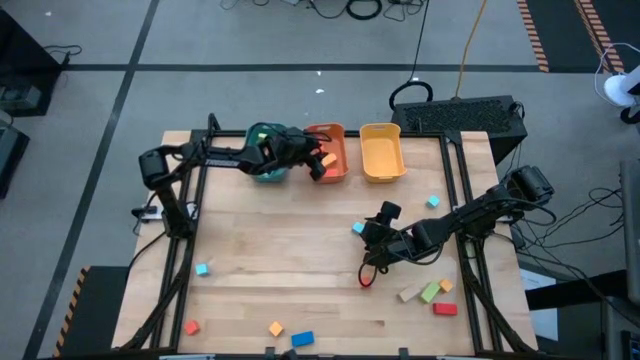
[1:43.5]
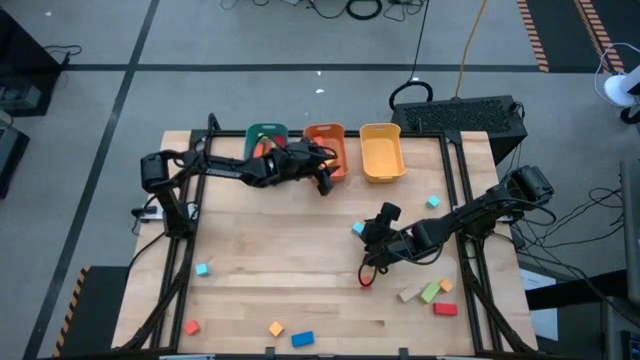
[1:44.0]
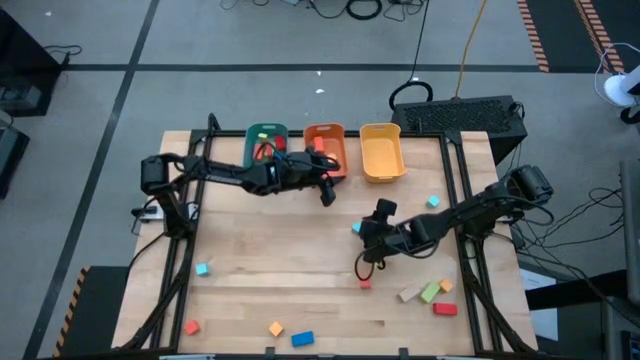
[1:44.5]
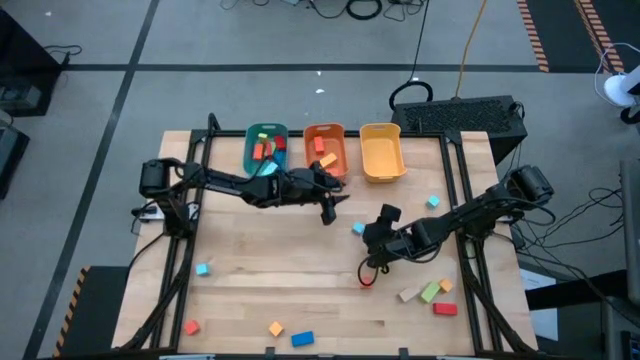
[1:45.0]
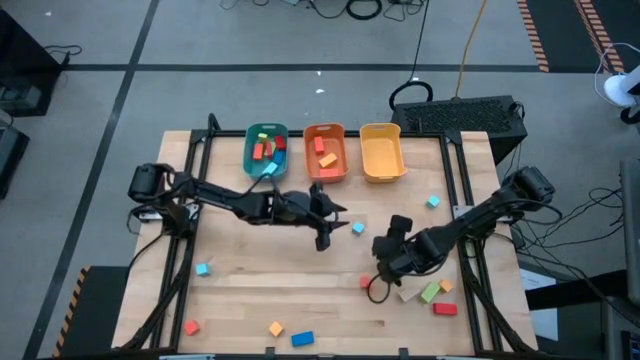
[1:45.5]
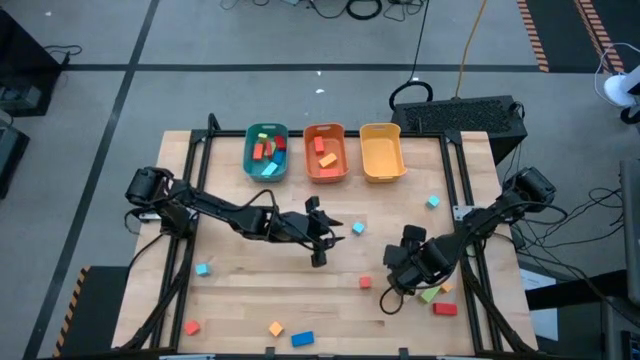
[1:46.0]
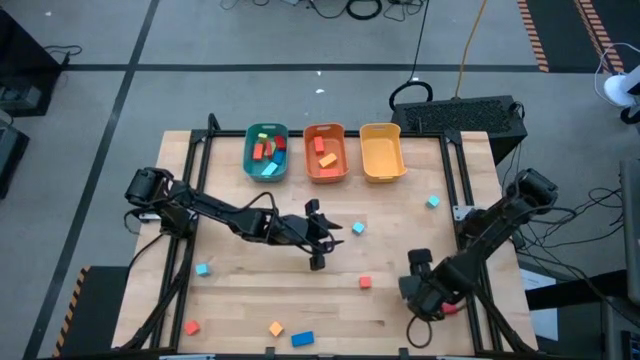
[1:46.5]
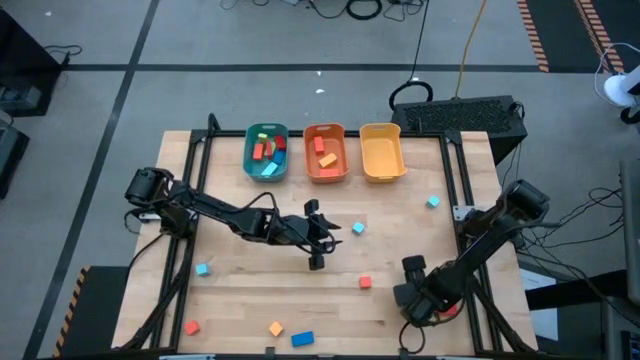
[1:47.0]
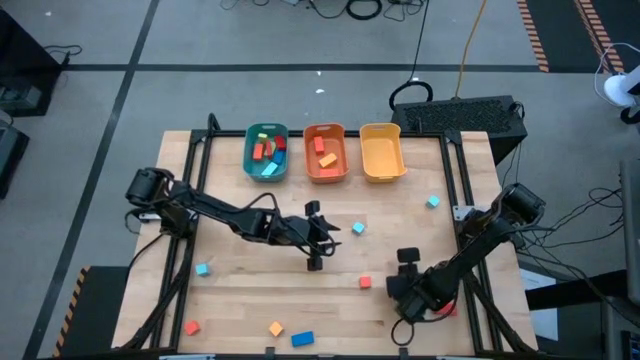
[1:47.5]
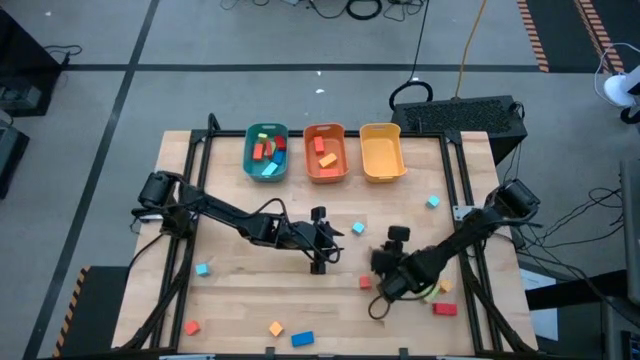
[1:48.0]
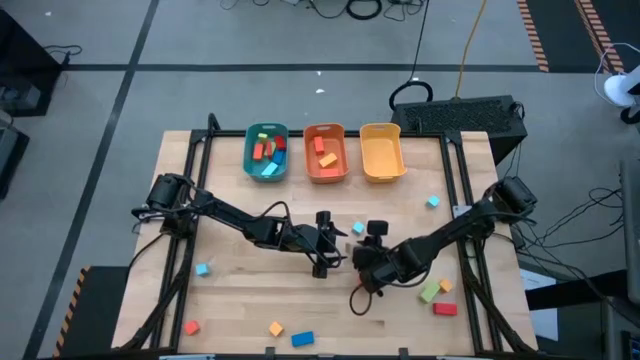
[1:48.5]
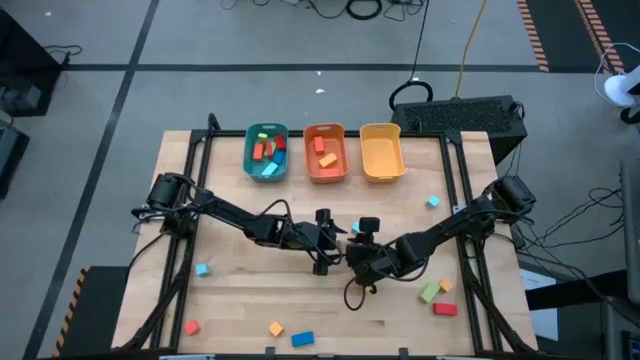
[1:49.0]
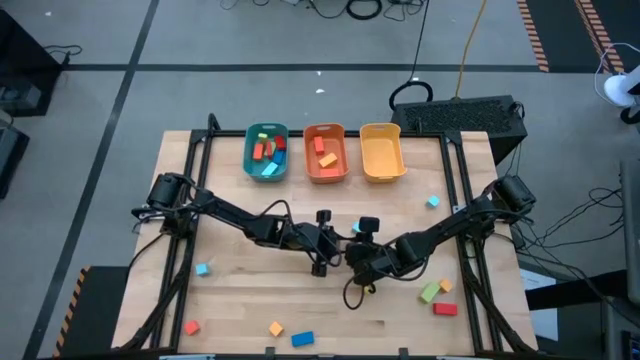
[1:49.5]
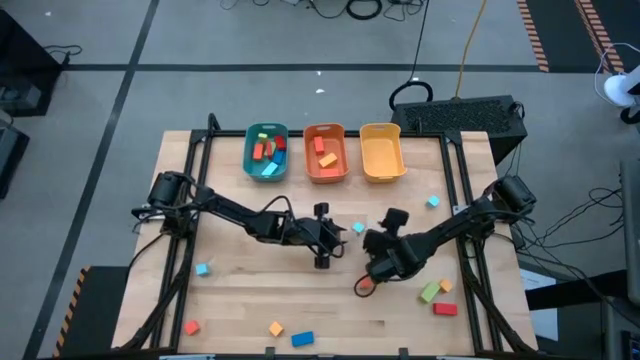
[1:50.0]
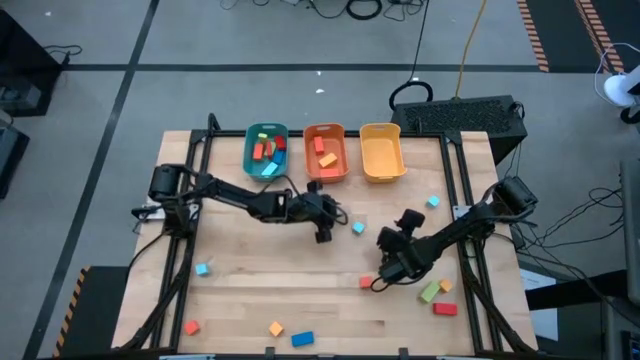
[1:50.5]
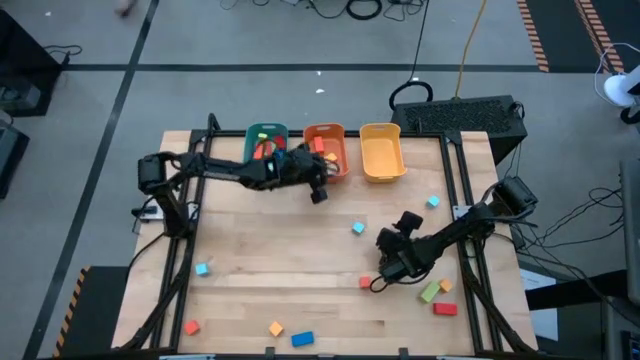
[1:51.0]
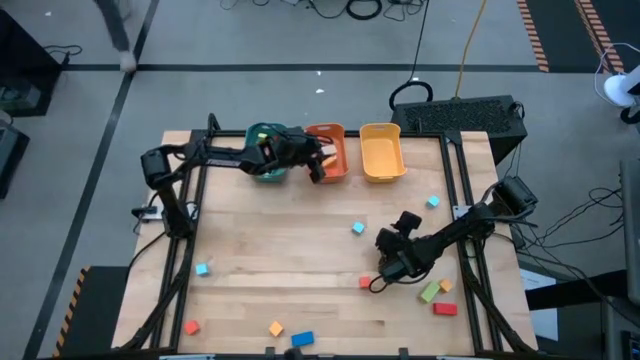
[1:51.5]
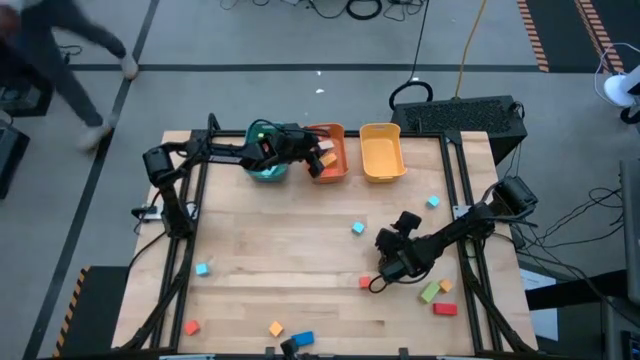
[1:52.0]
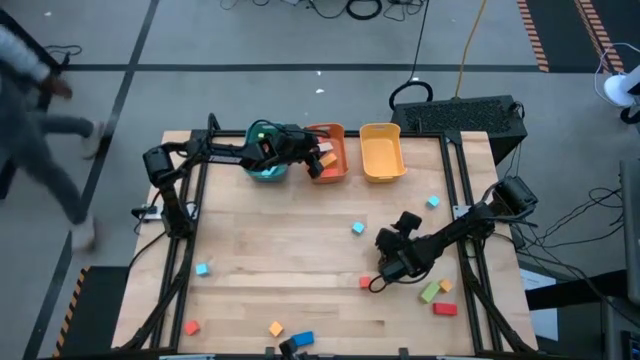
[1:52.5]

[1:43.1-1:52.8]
Task: Sort blocks by size
Put the brown thick rectangular block into the orange bin

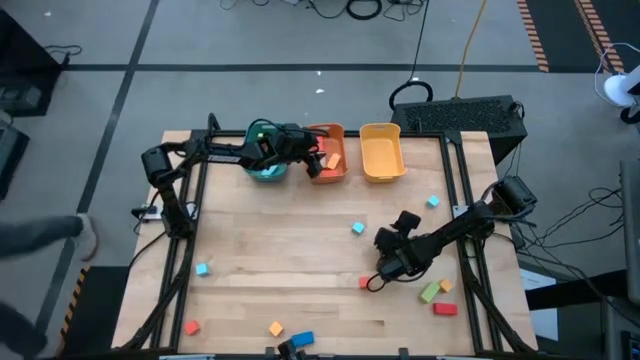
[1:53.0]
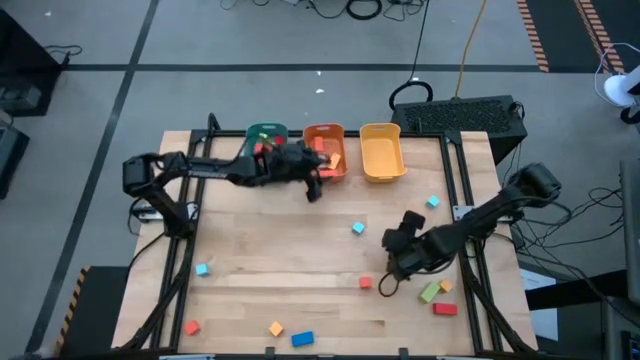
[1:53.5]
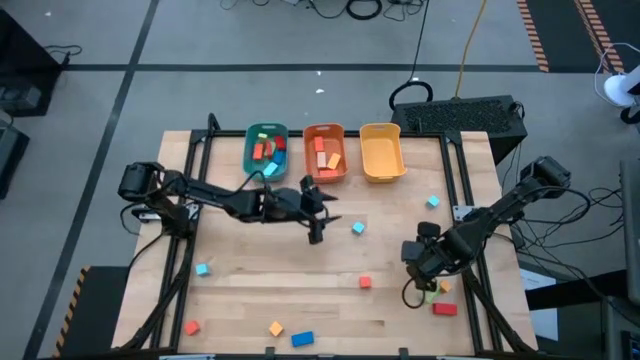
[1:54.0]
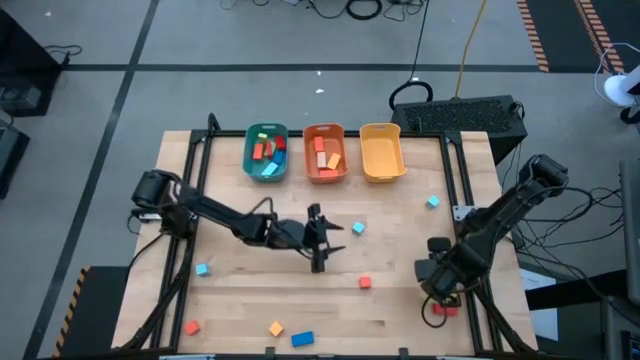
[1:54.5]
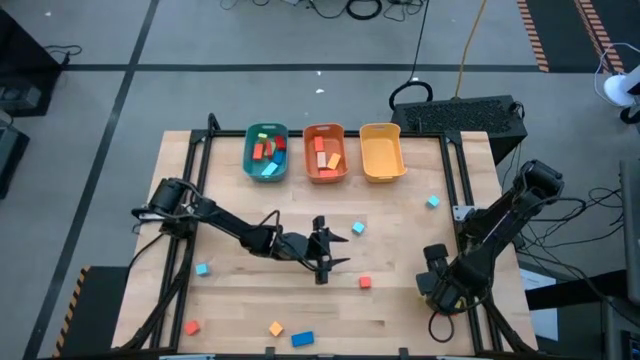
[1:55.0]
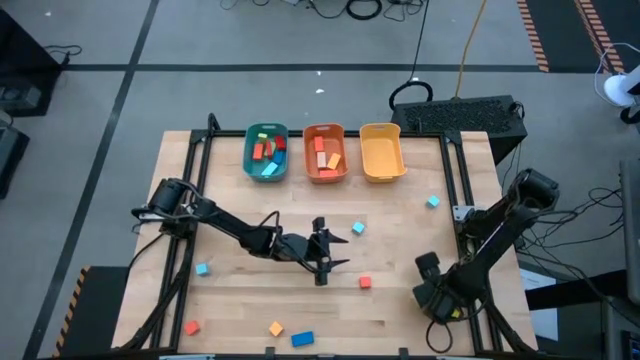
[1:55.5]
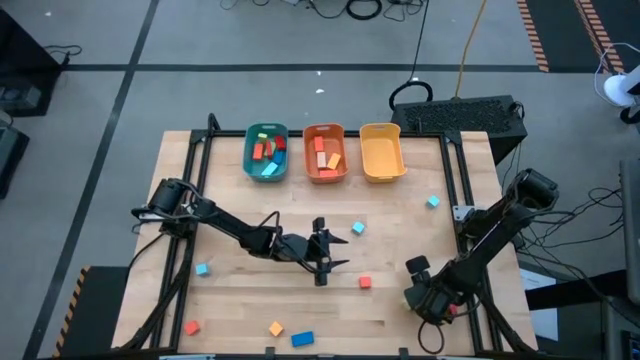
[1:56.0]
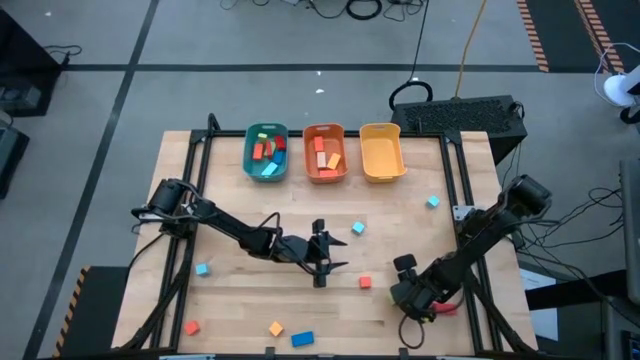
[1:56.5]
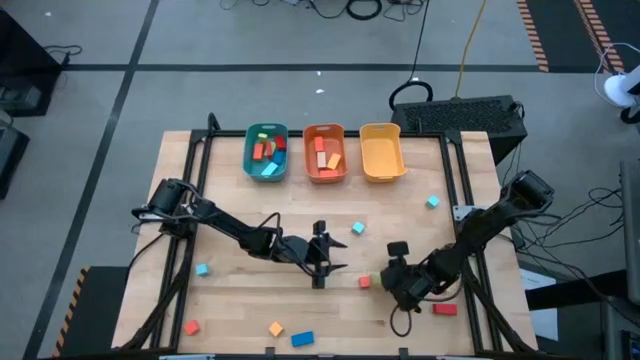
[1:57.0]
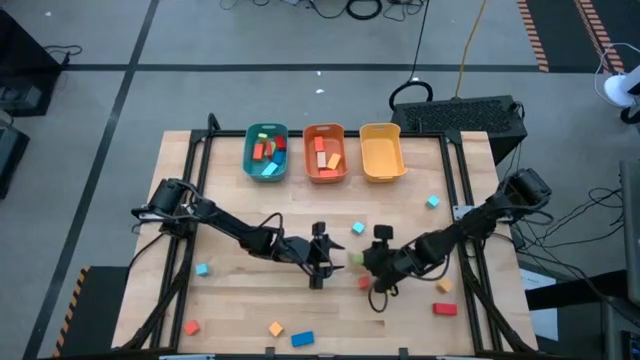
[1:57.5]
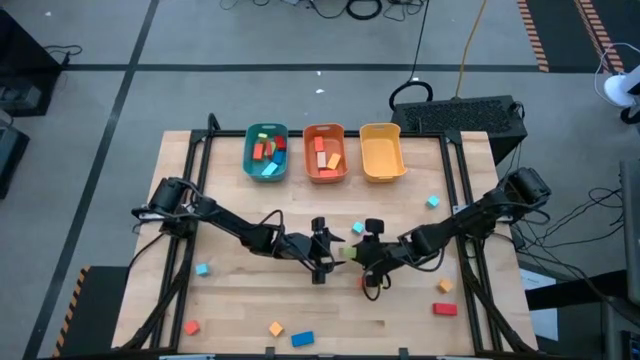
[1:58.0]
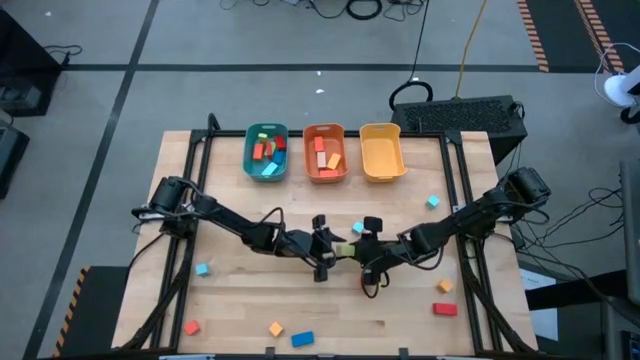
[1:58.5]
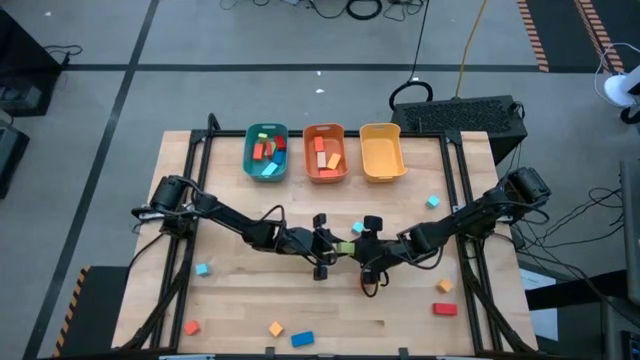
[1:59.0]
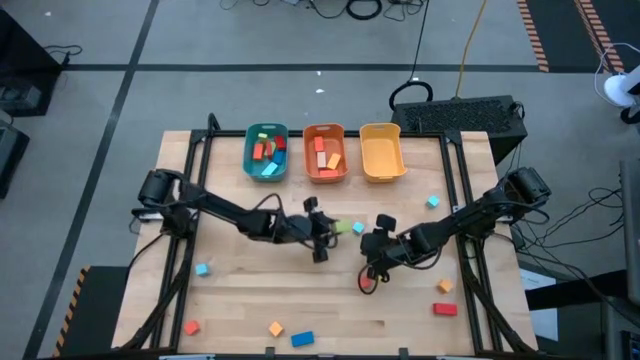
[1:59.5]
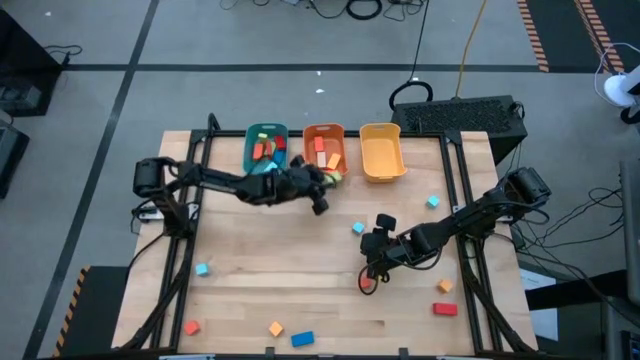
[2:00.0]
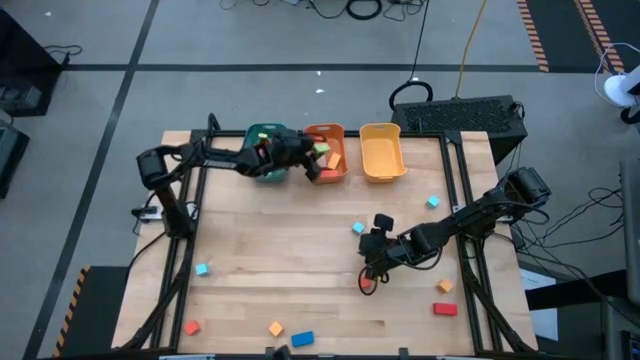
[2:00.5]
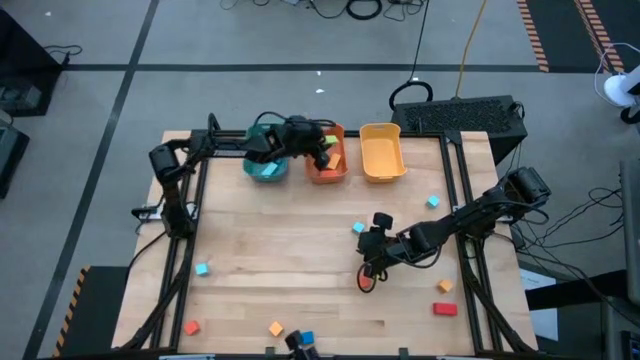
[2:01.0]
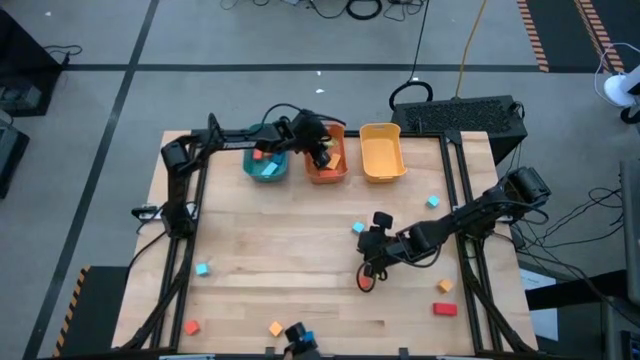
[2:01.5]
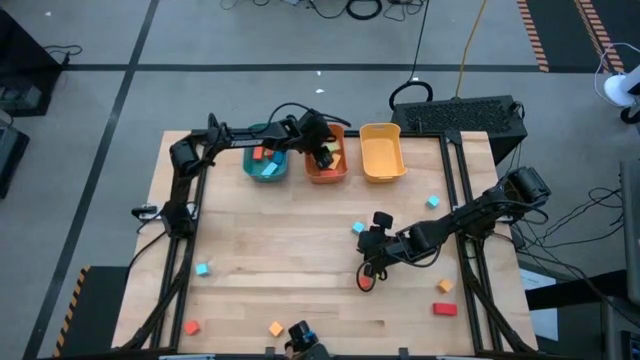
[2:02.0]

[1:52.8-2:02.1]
Put the green thick rectangular block into the orange bin

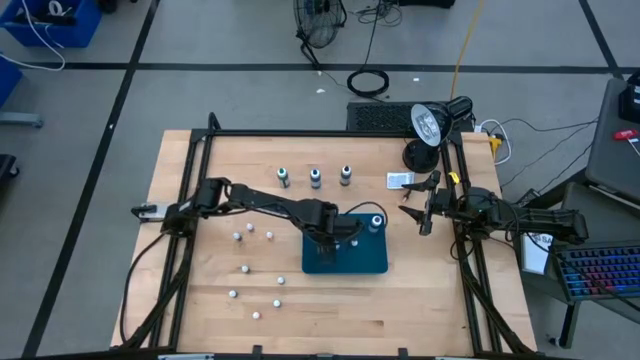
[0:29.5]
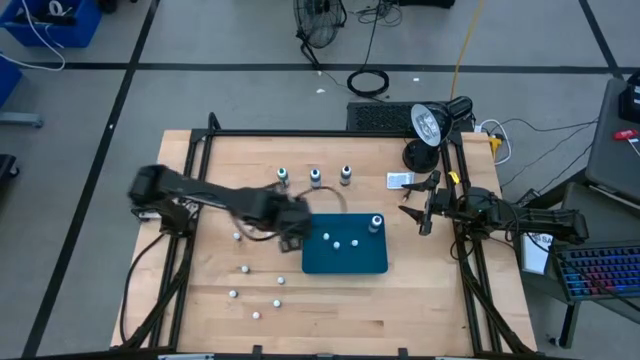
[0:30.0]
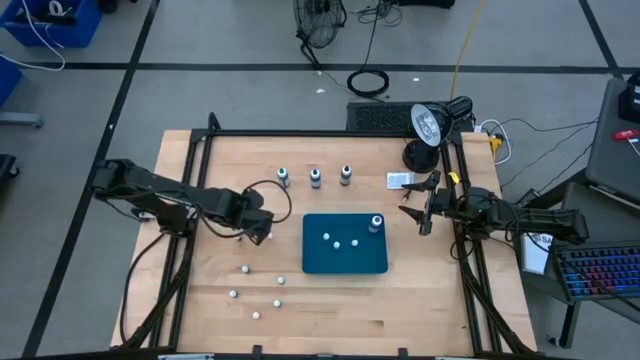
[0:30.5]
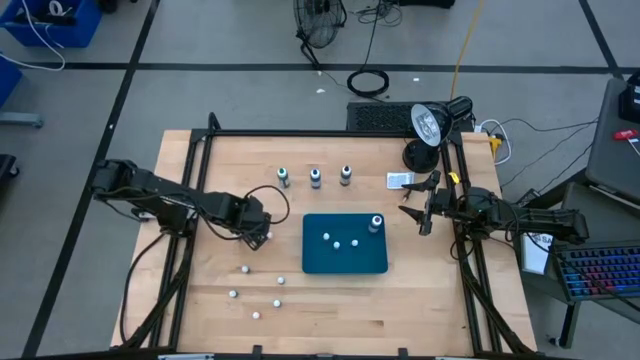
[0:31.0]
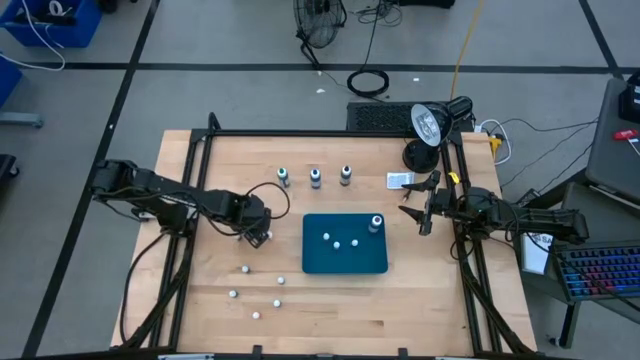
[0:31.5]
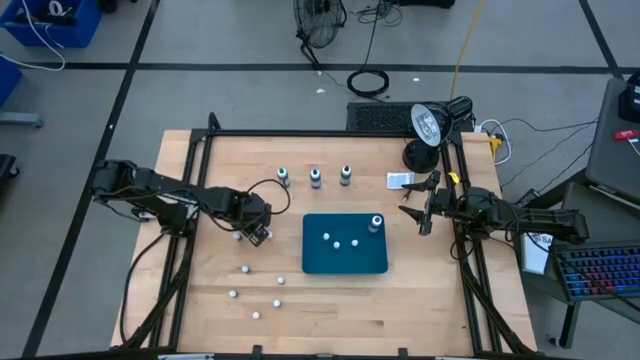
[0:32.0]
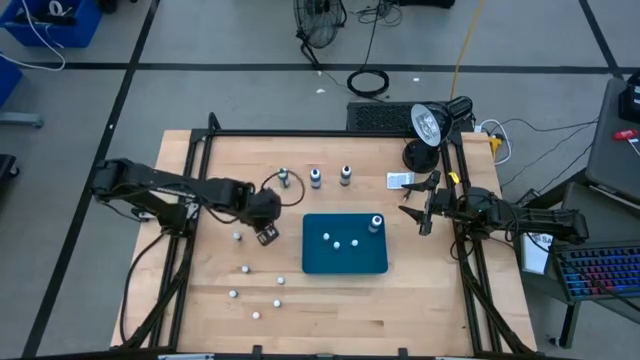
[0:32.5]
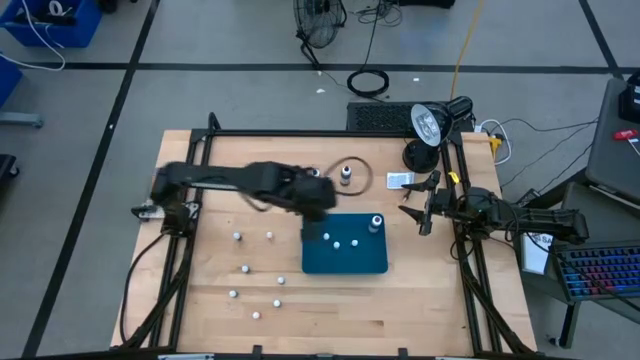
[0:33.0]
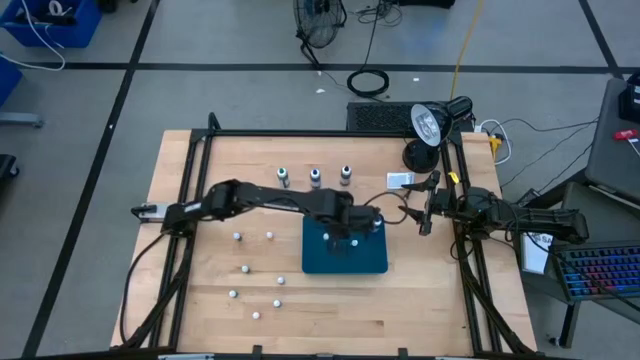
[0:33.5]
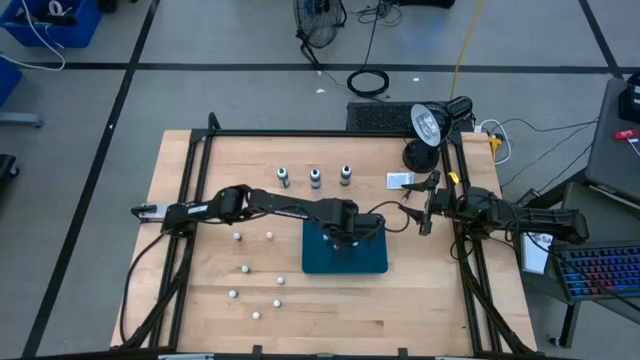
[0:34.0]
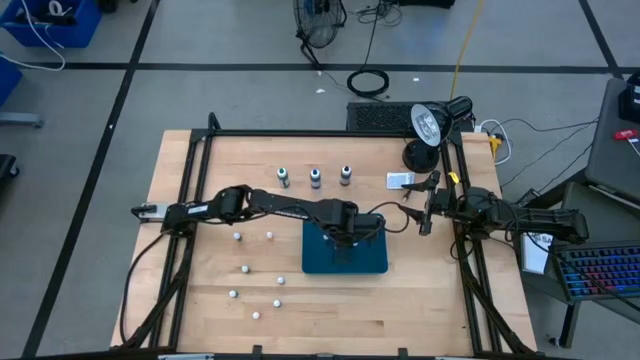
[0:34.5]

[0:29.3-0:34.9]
Task: Pick & Place food coloring
Put the top small red food coloring bottle into the blue bin
